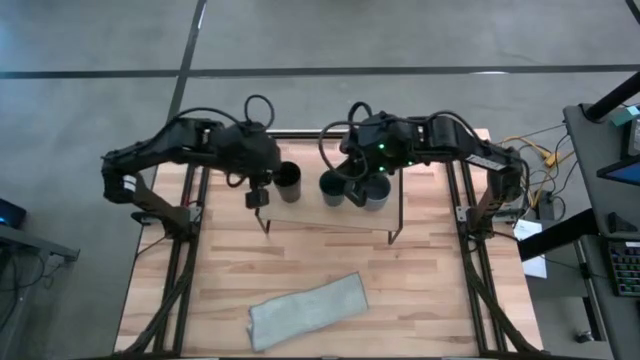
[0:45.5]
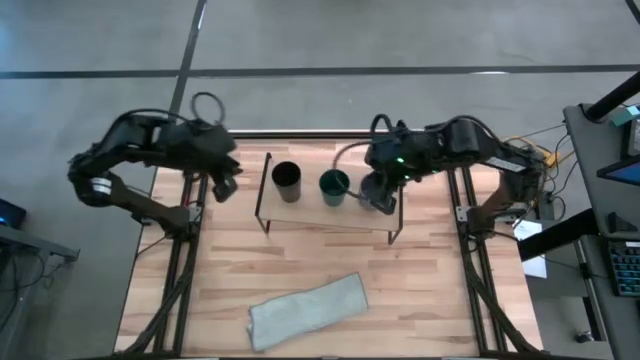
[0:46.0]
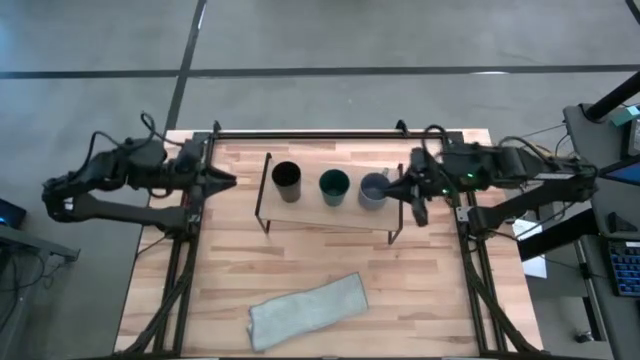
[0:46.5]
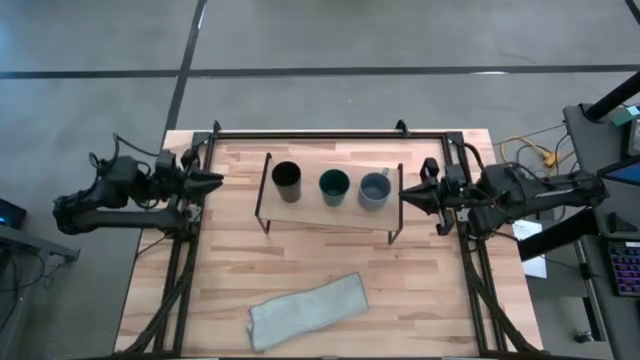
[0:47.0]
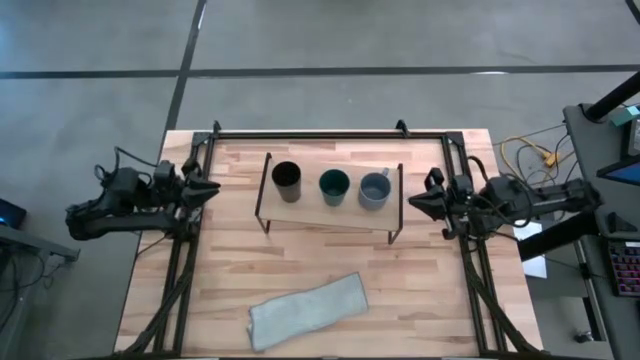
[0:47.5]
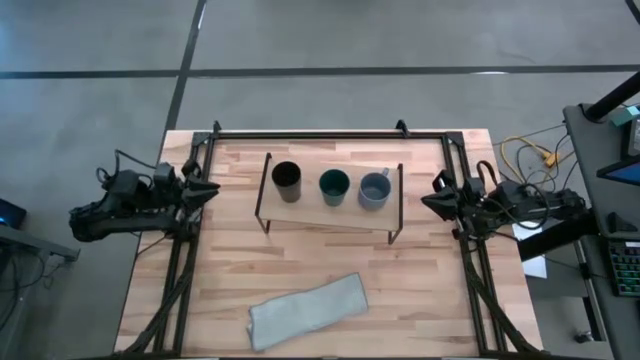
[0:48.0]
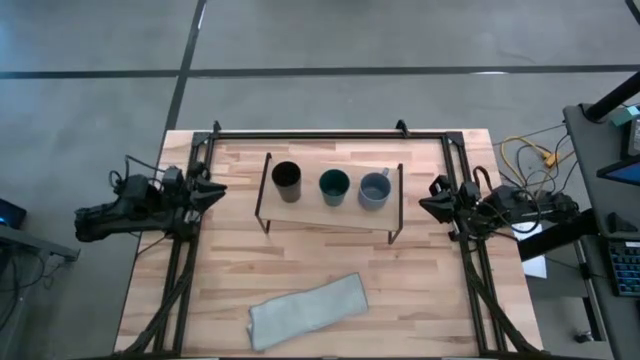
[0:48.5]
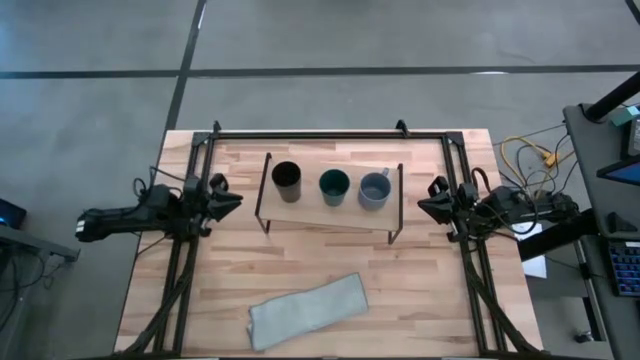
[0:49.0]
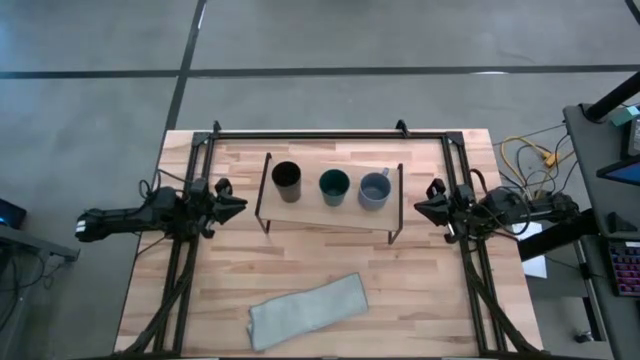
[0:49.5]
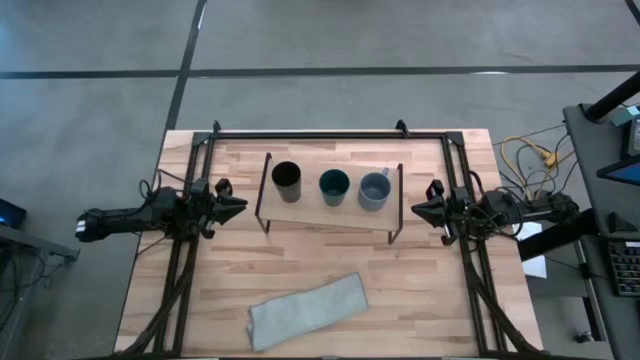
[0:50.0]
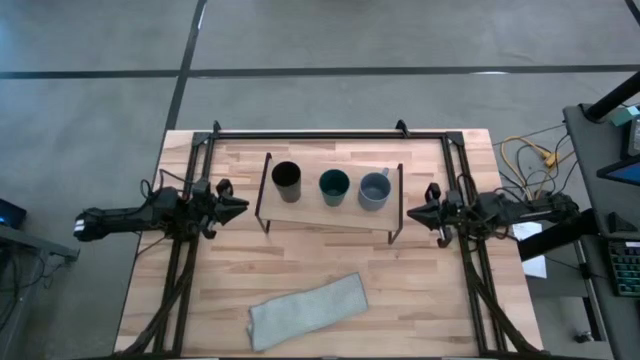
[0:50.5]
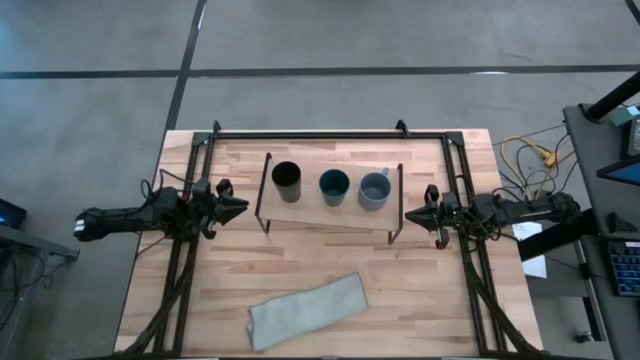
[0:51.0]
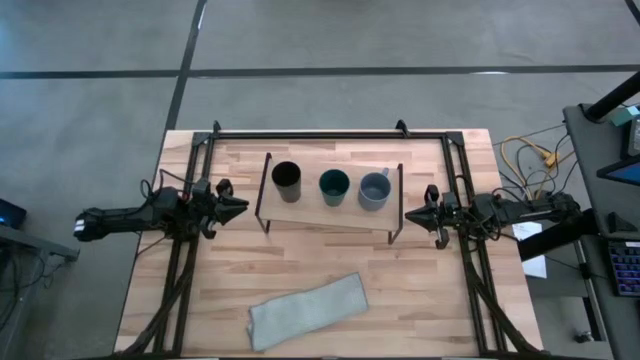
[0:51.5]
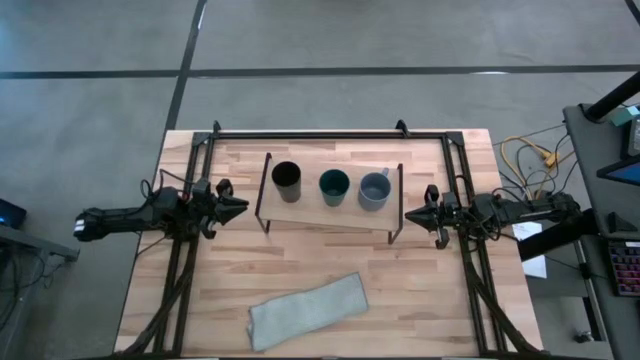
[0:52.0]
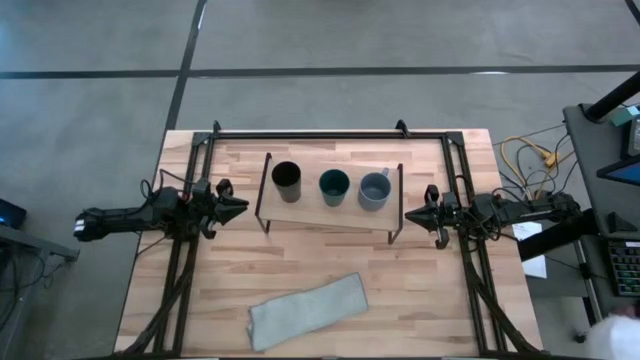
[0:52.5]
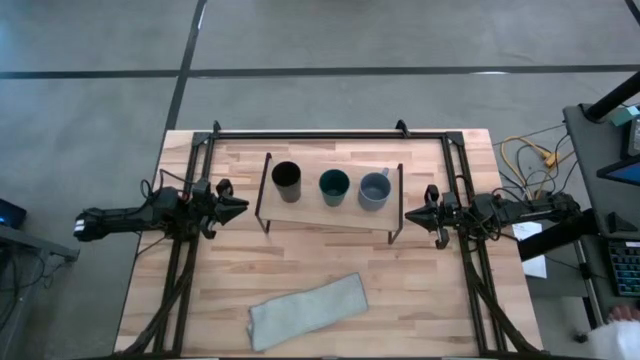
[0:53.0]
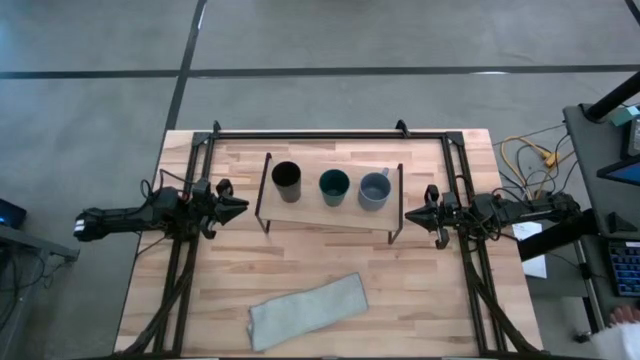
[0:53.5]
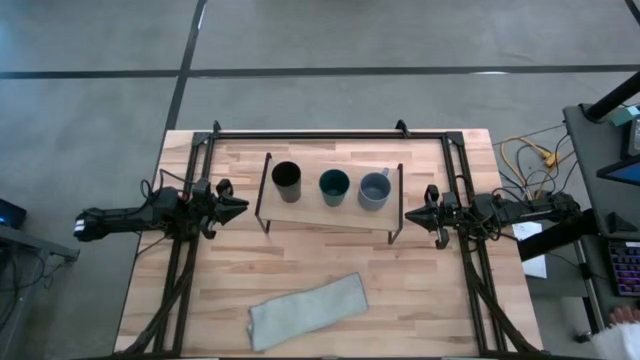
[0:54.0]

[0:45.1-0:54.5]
Task: Stack small to large cups/mugs on shelf
Return to home position
